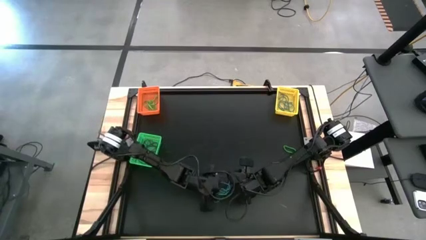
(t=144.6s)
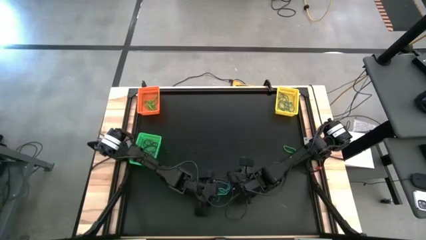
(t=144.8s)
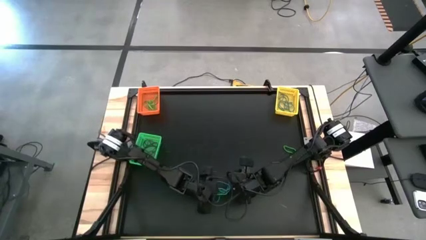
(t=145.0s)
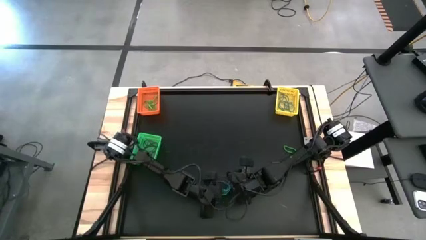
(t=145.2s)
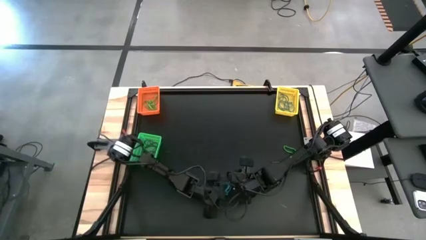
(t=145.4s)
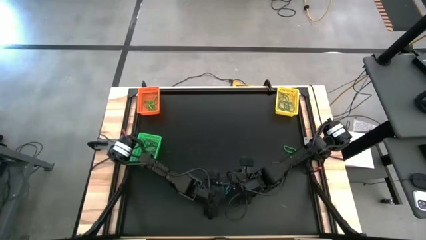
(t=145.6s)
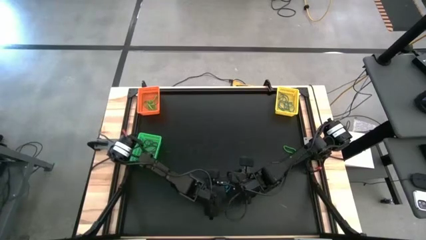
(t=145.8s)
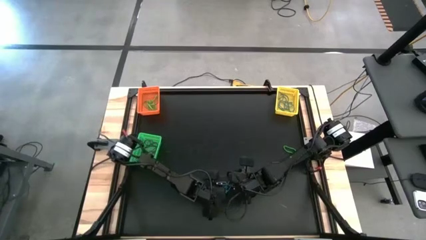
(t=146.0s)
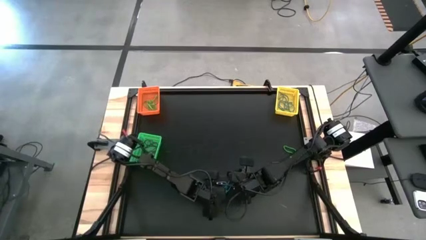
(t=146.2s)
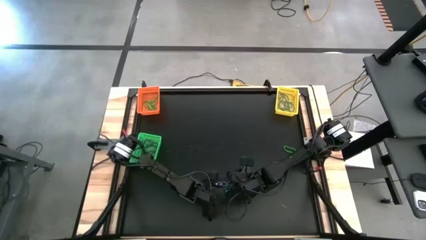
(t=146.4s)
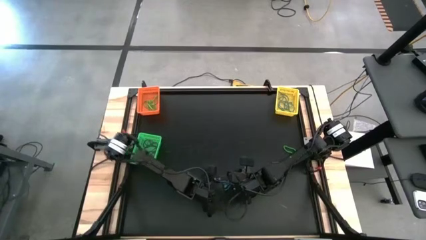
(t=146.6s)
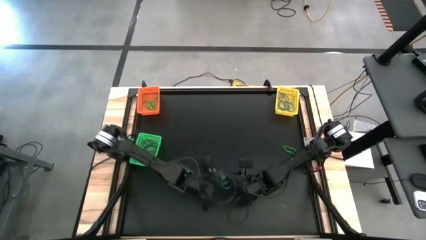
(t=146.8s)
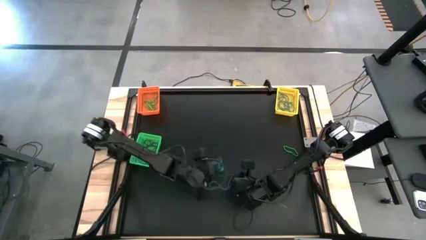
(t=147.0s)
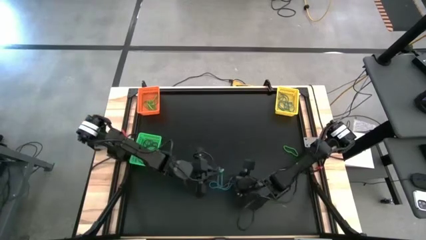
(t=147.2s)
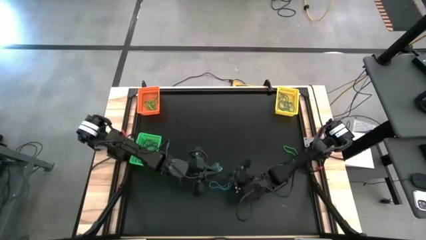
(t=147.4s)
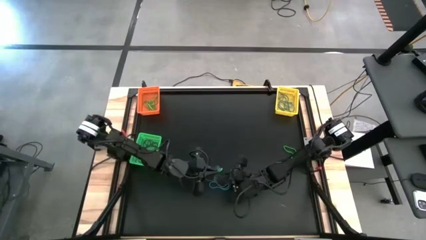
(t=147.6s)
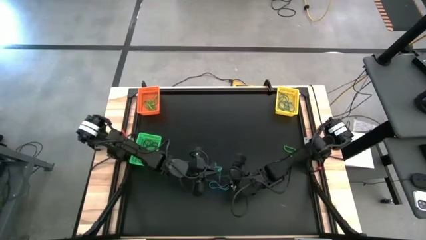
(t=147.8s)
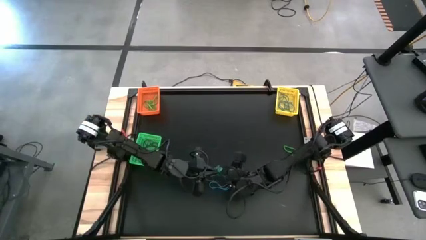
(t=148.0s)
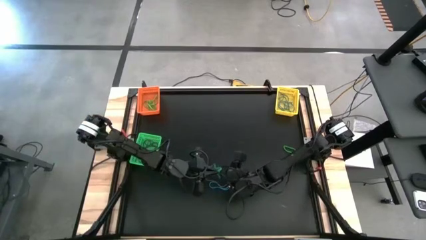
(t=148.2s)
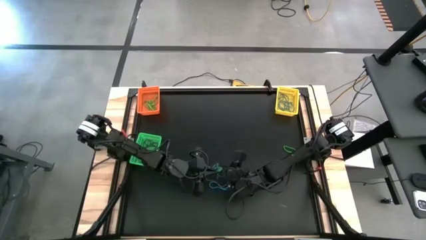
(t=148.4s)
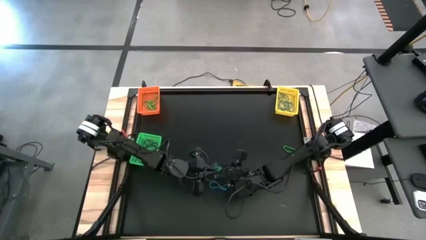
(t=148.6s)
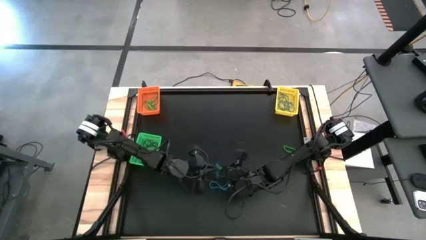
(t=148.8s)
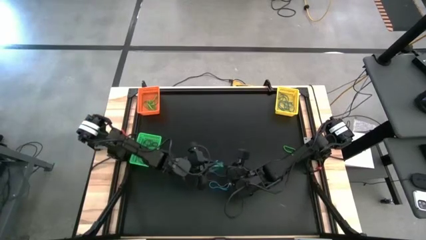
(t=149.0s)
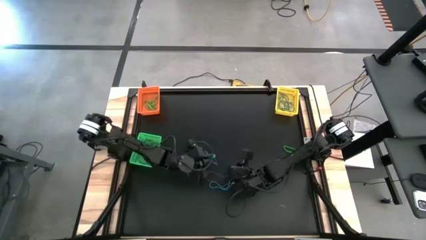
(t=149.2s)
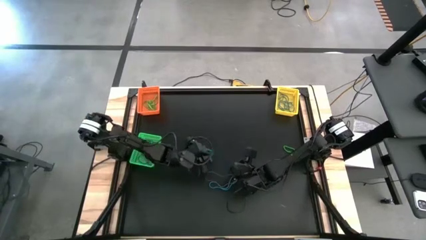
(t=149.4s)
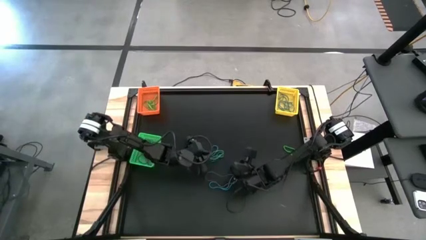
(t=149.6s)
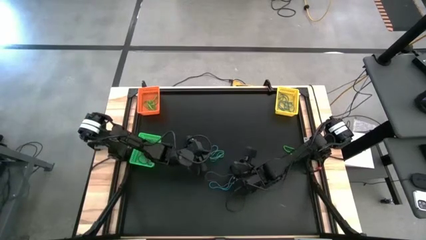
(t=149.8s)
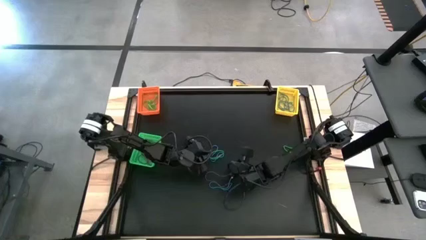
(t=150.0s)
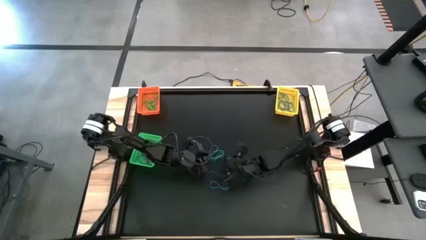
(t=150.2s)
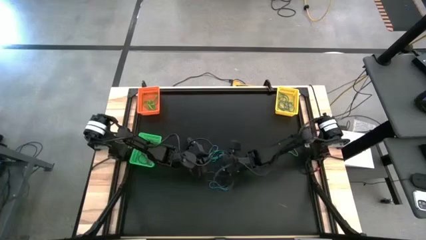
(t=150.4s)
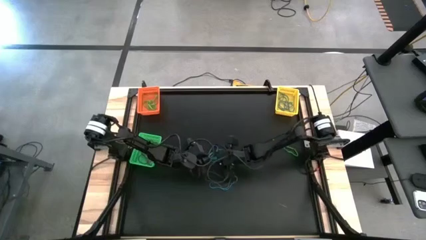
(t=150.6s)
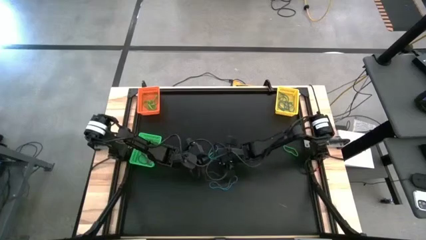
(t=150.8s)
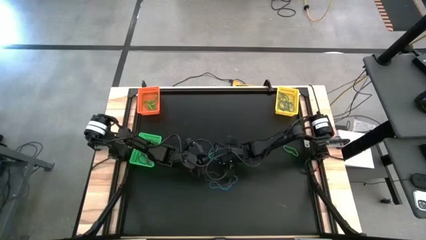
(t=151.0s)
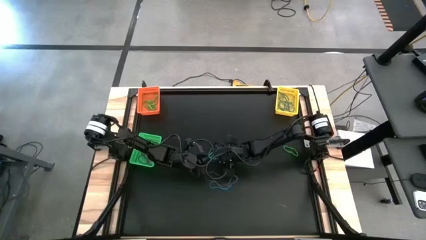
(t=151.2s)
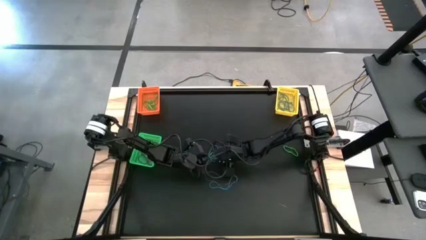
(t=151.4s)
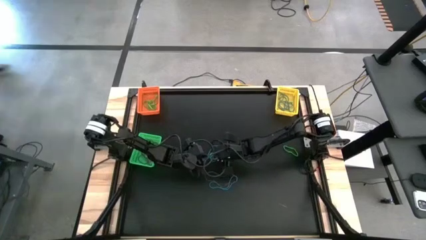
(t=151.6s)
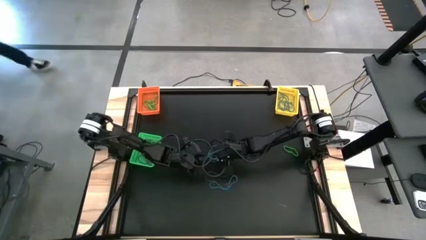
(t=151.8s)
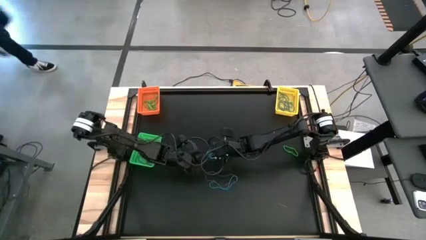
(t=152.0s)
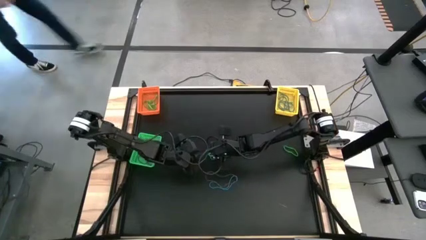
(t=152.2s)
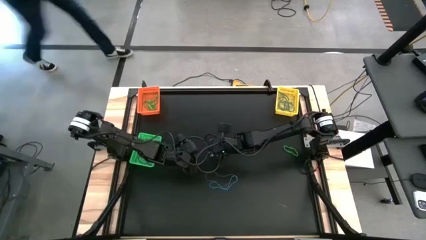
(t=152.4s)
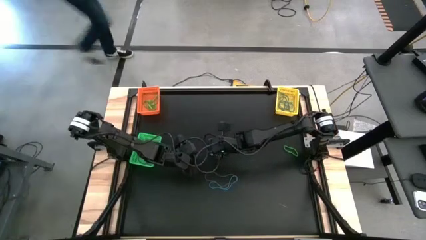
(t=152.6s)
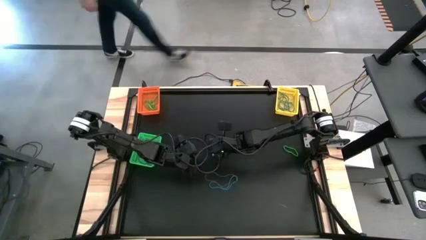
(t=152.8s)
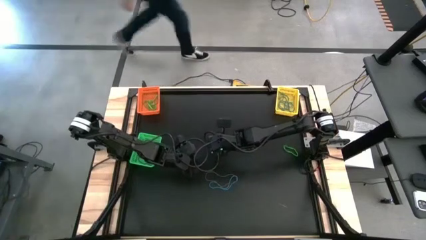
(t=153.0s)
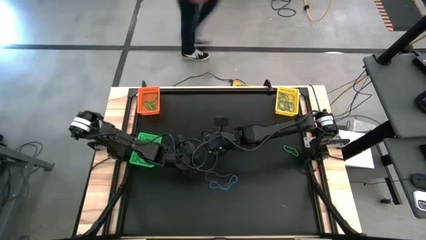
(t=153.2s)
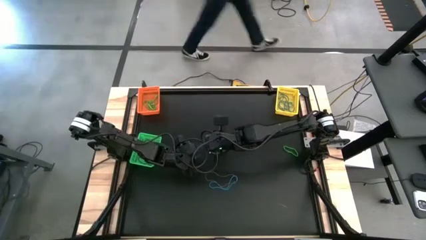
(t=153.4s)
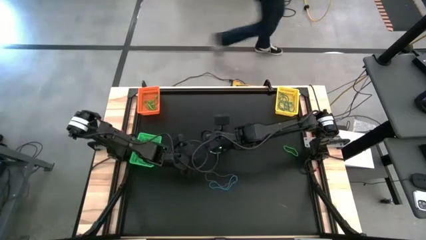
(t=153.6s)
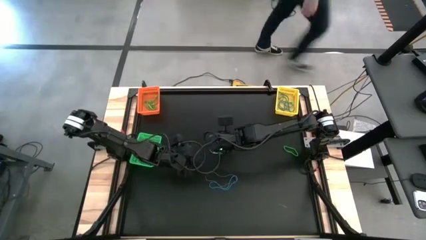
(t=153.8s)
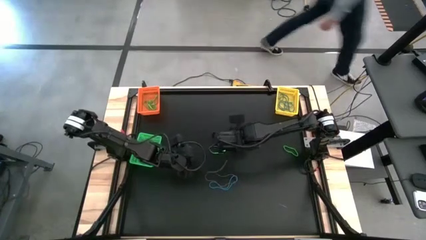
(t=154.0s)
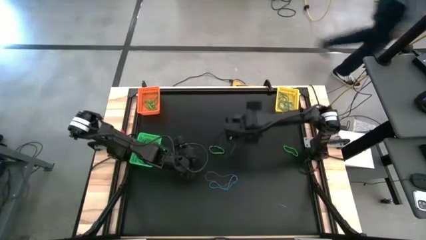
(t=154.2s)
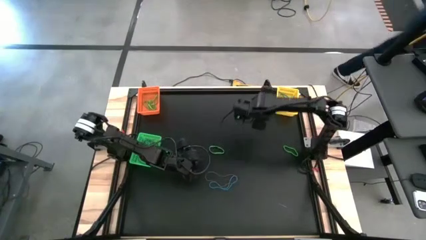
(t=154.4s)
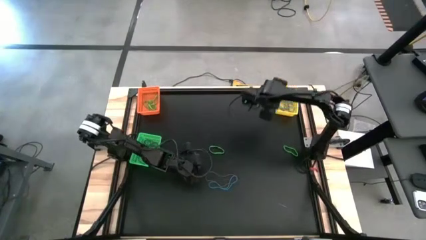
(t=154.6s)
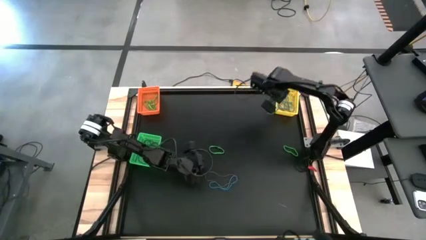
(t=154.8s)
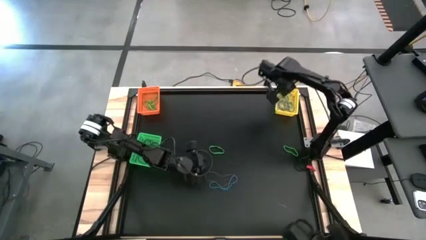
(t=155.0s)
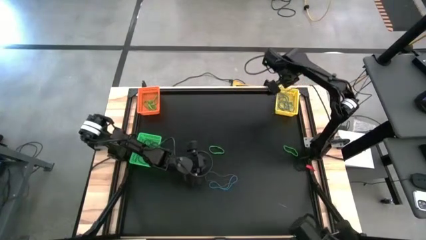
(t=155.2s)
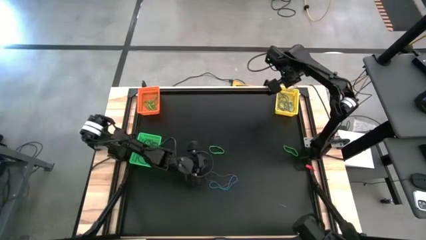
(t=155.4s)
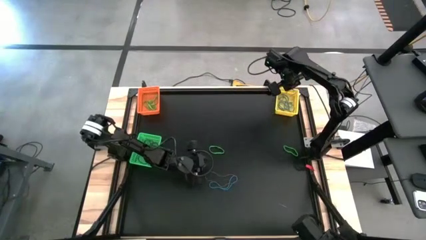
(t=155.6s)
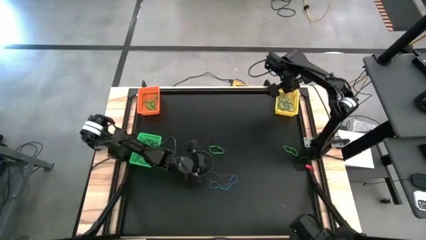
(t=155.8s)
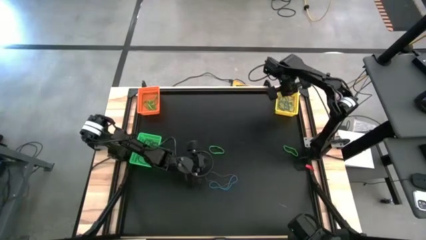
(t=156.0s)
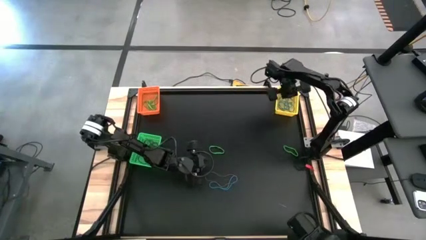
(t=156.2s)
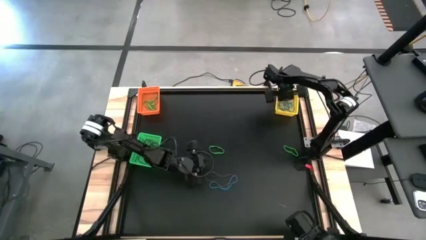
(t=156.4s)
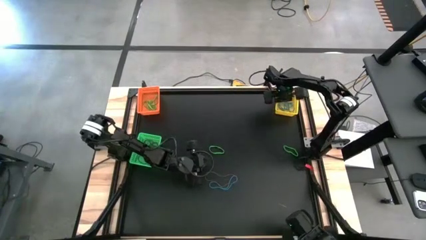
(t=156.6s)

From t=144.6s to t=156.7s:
Task: Sort rubber bands into baskets
Put the center blue rubber band into the yellow bin

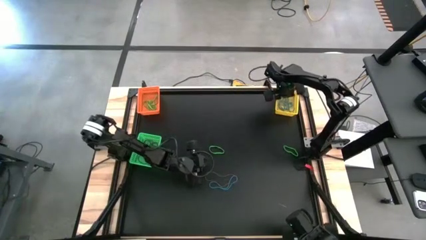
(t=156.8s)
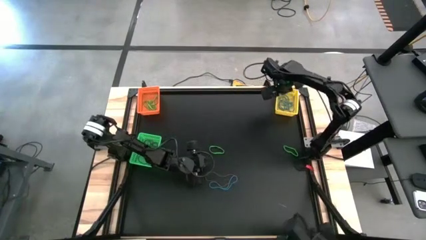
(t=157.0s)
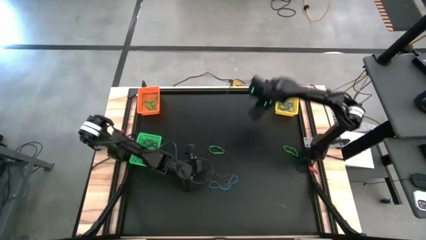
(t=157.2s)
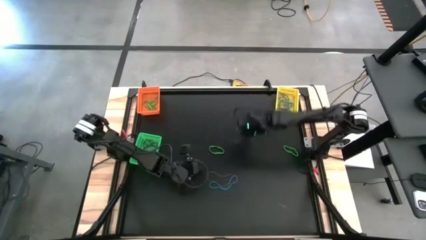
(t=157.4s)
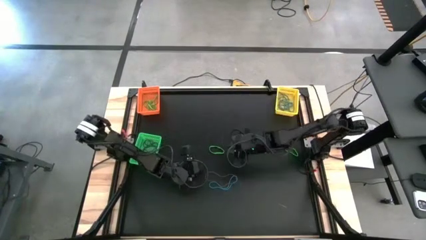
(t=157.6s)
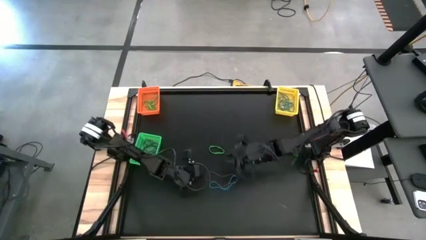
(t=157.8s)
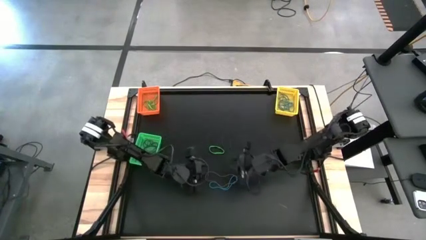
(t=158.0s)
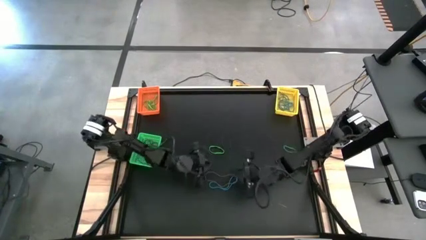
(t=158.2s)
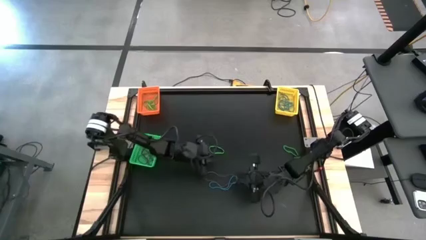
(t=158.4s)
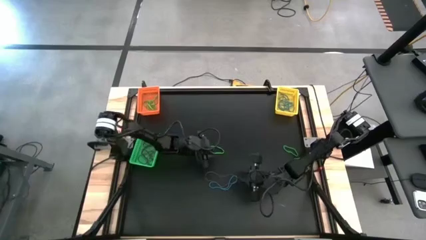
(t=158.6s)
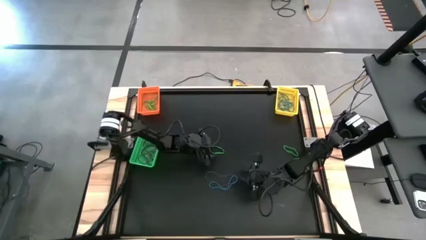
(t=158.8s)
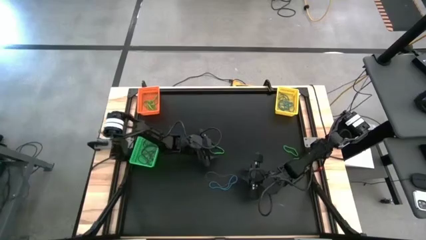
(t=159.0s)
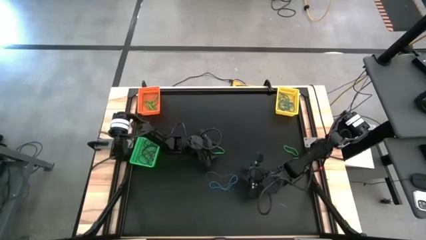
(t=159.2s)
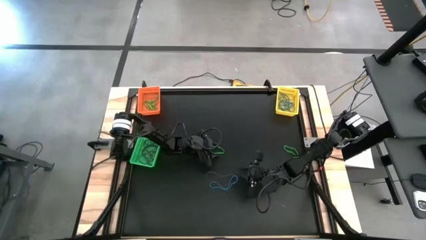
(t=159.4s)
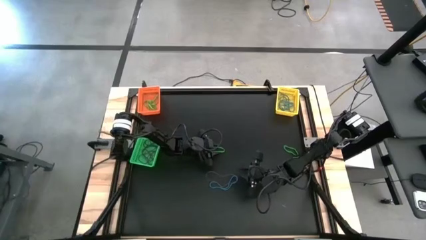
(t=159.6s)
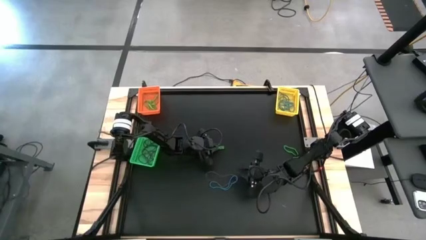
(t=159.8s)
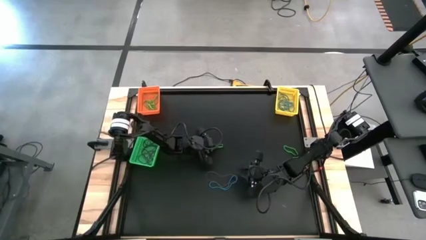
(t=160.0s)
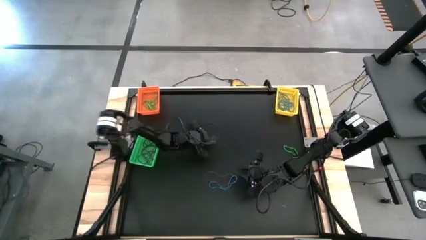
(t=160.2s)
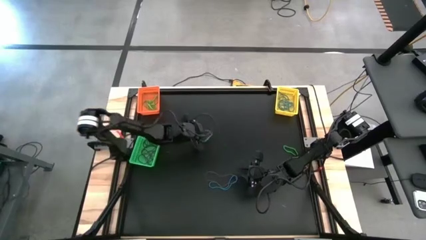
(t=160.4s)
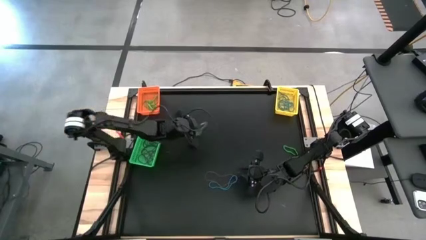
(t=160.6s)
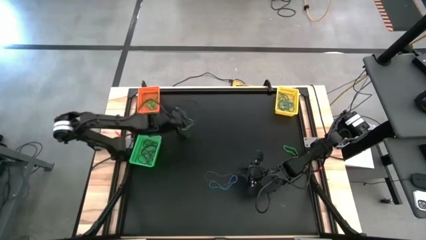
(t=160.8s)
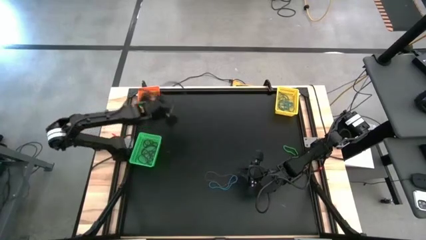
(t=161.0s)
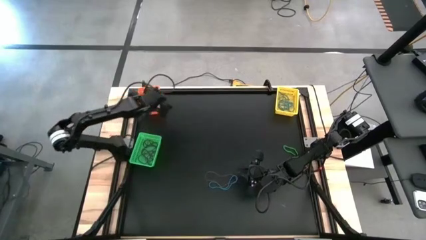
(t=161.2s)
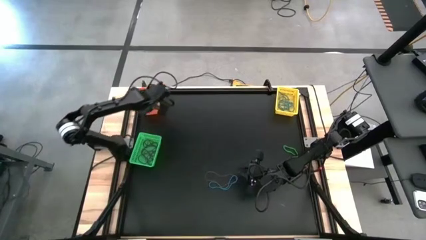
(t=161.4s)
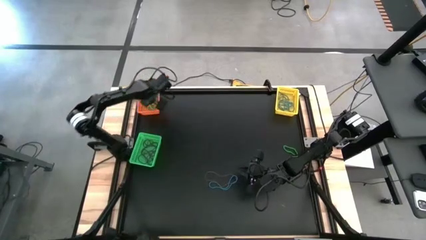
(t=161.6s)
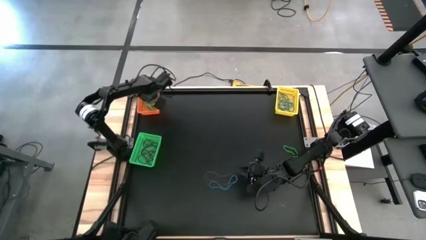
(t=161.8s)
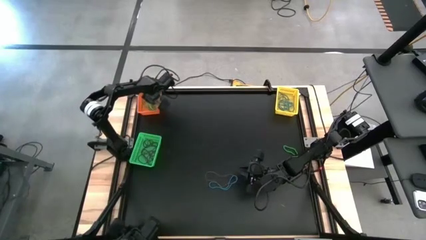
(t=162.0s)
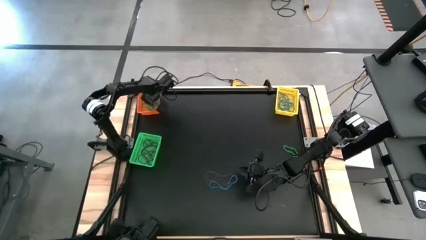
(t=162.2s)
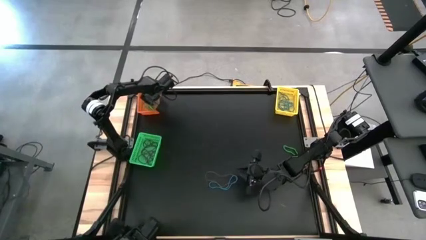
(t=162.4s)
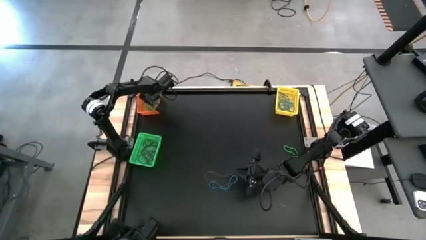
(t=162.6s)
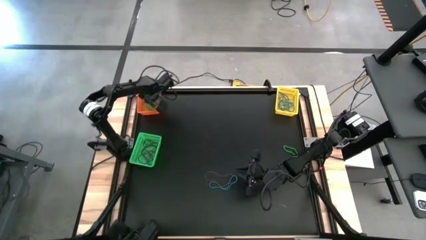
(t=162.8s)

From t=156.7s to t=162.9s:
Put the left green rubber band into the orange bin
